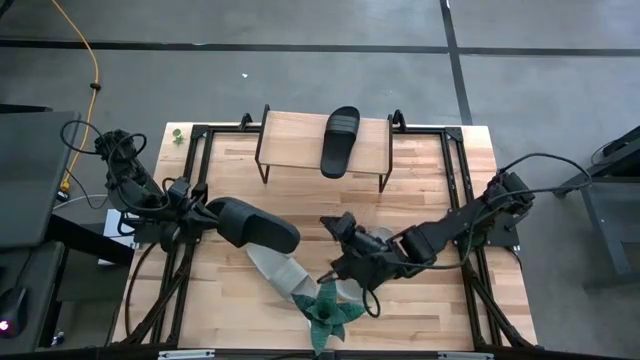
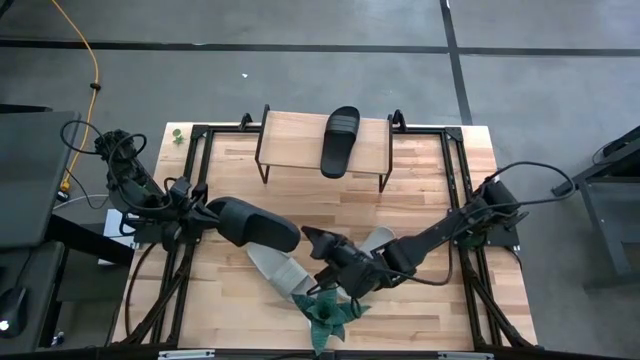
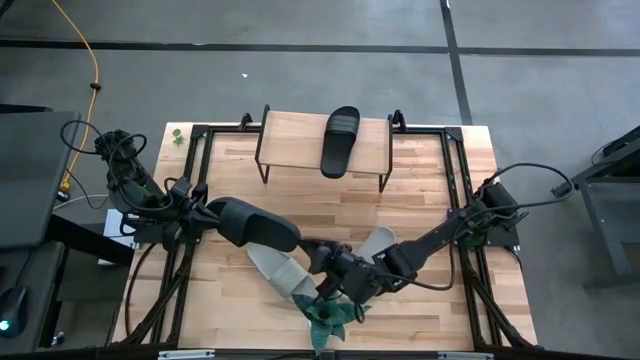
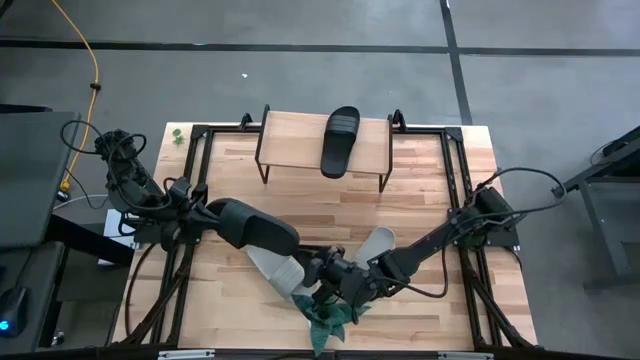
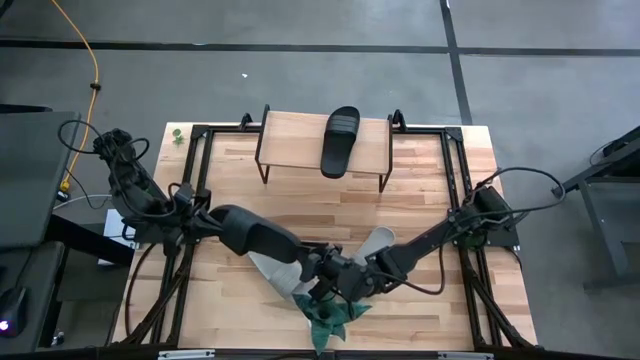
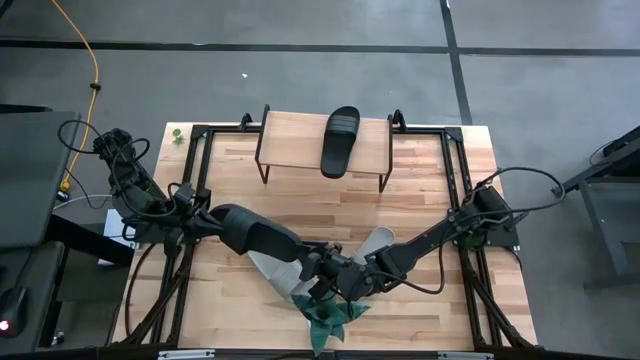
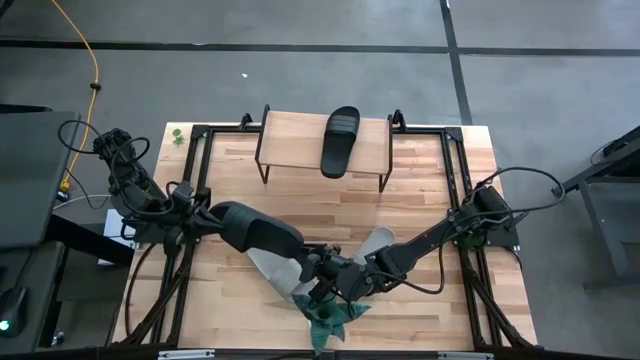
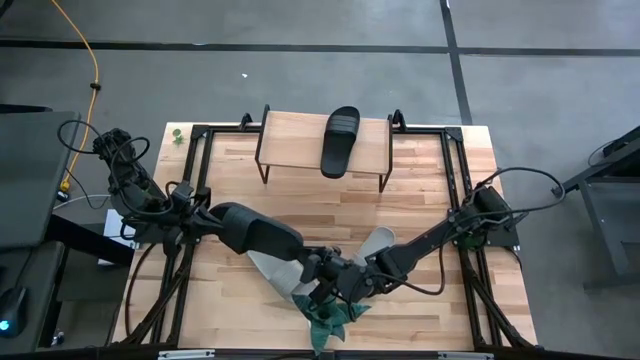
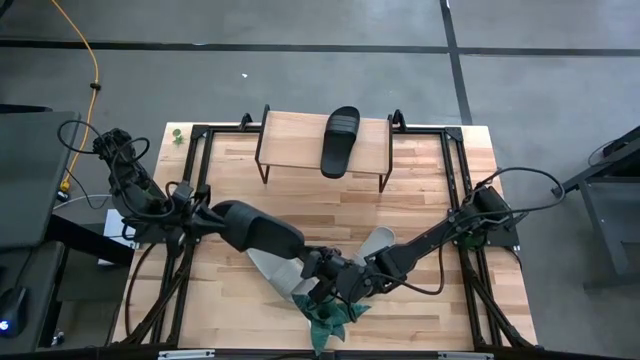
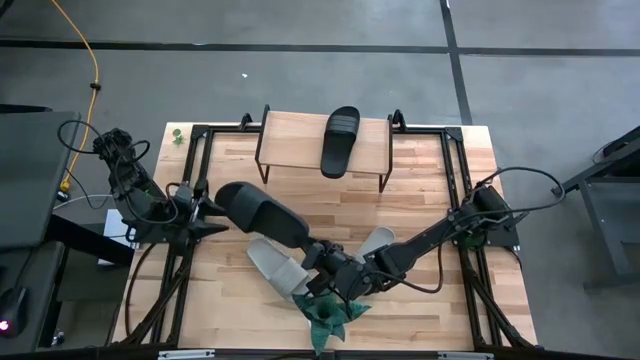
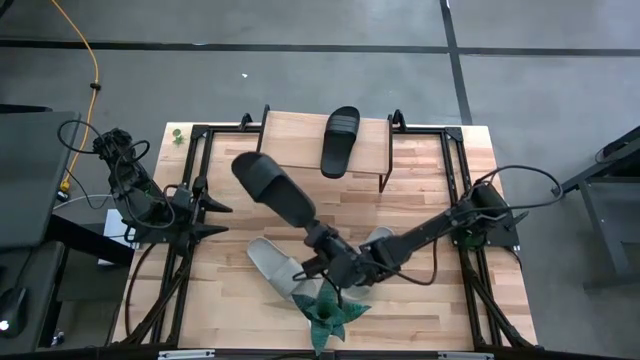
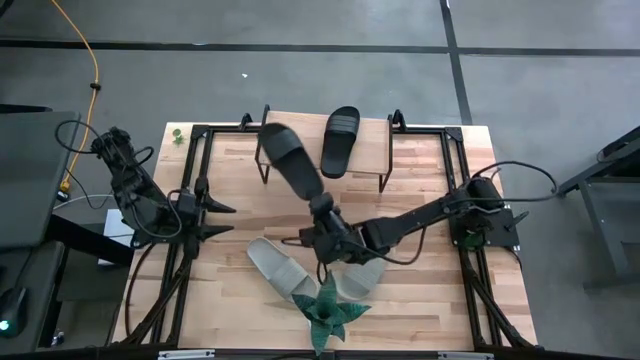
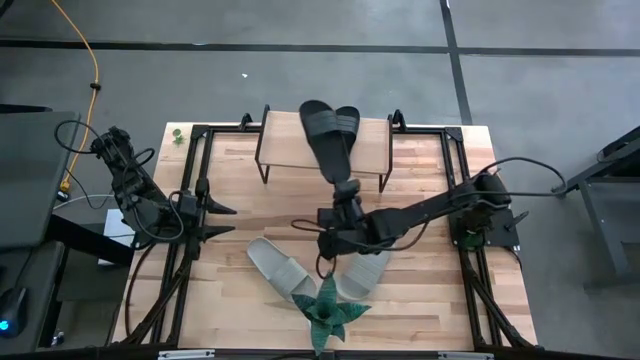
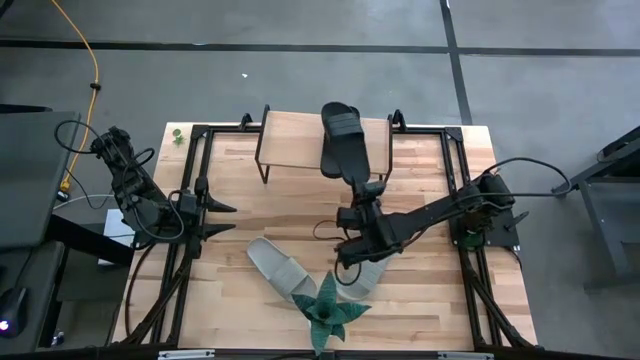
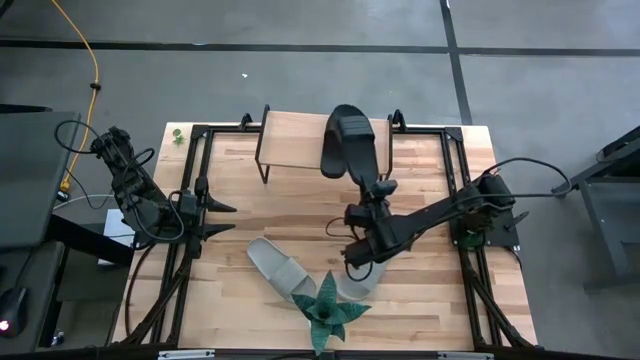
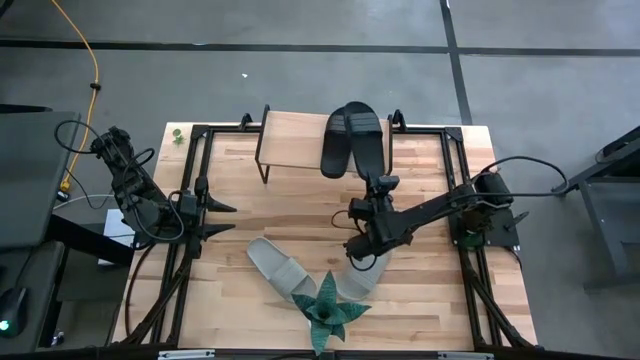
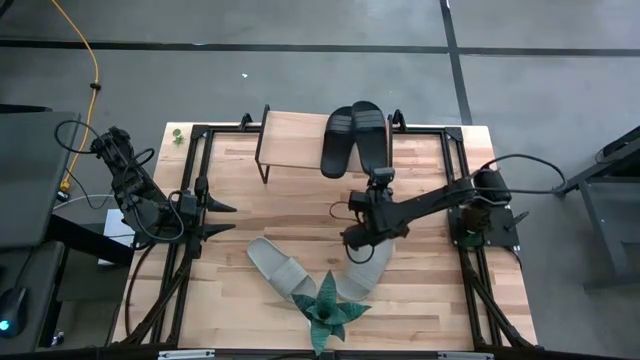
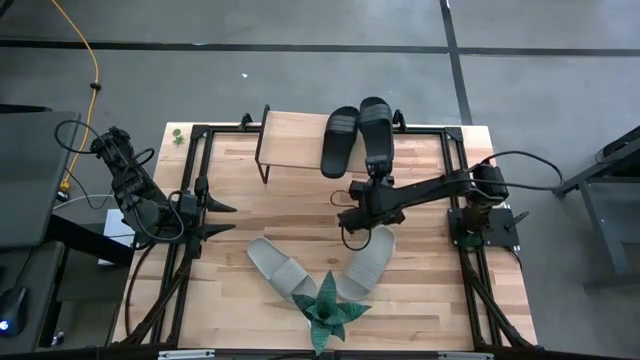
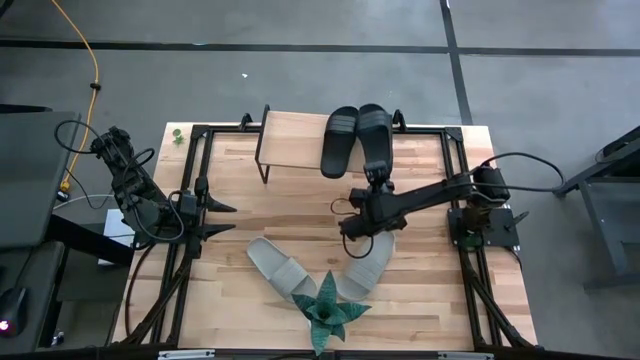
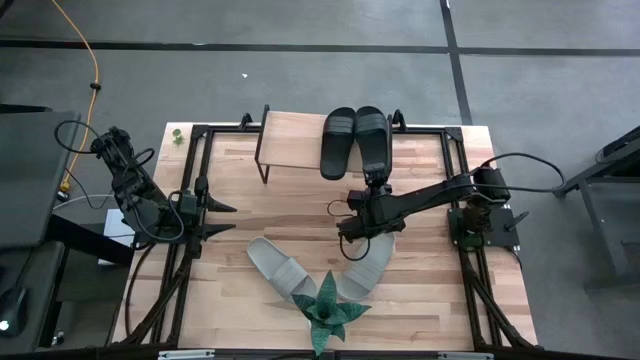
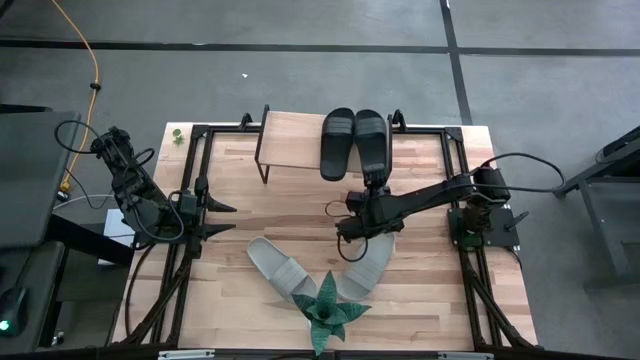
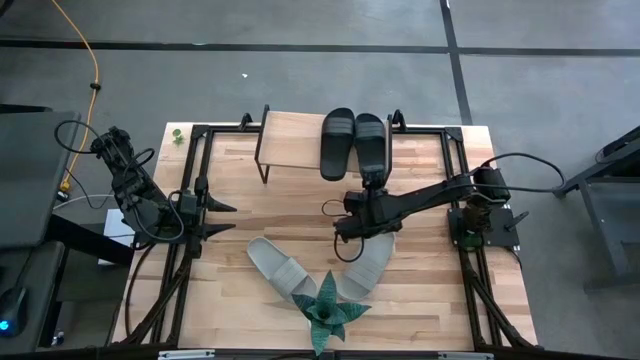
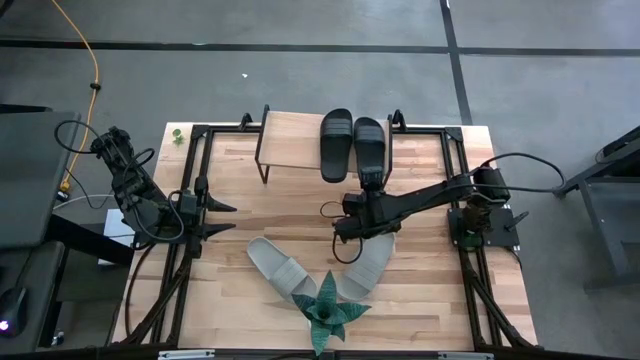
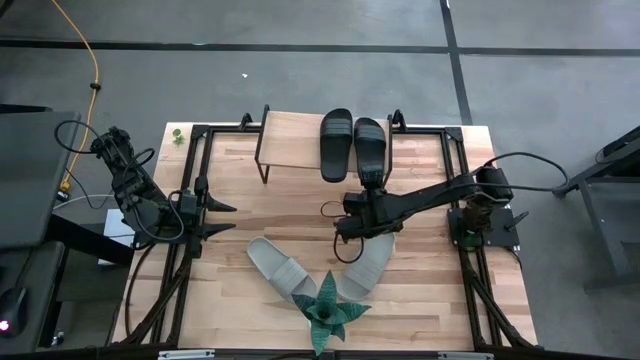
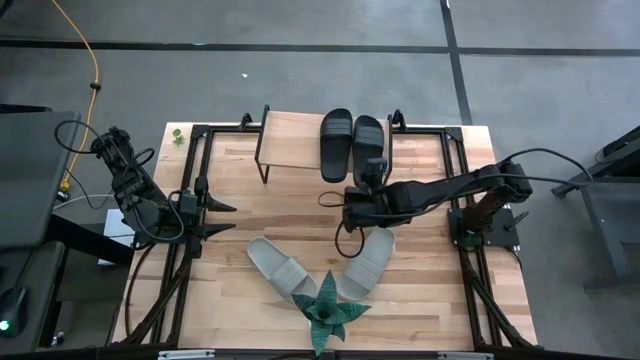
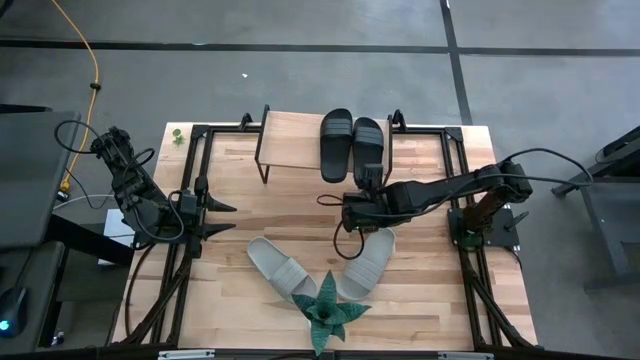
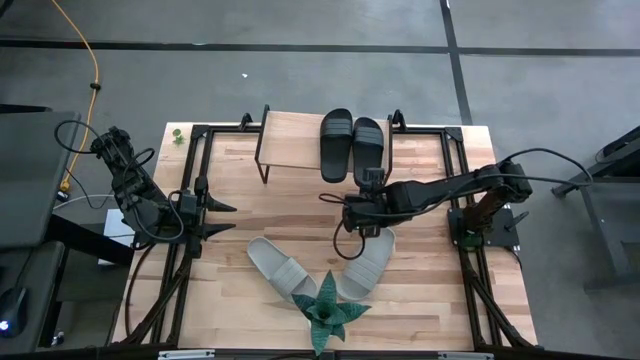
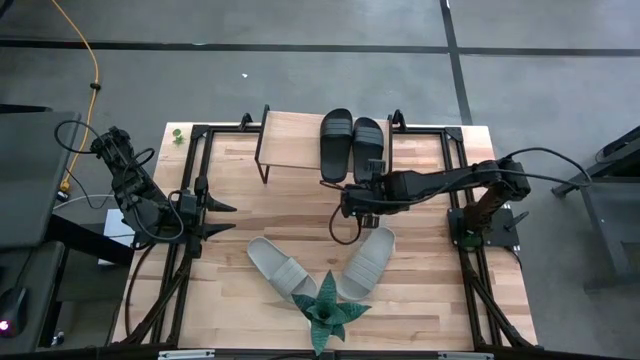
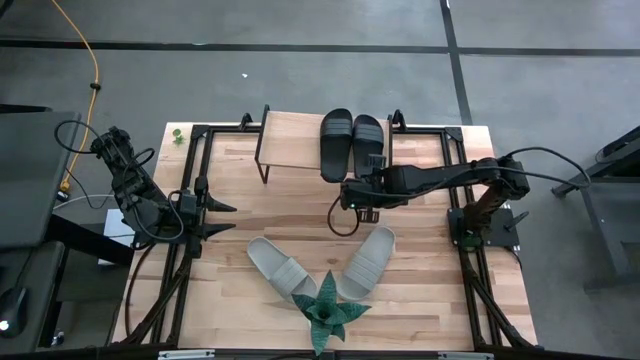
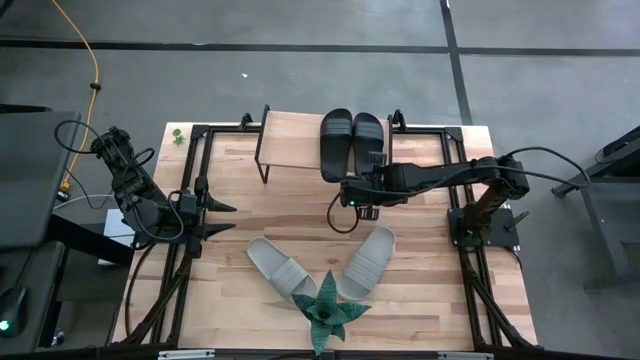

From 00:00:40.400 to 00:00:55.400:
Task: Pick and place slides into the shelf
Put the black slipper on the shelf
